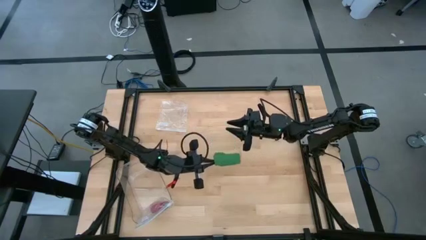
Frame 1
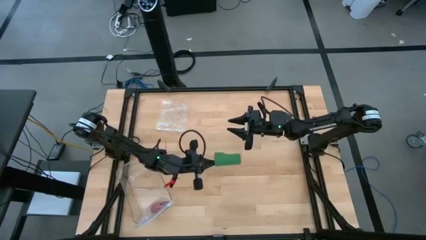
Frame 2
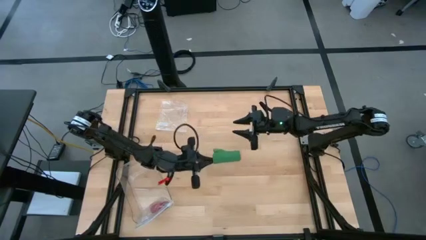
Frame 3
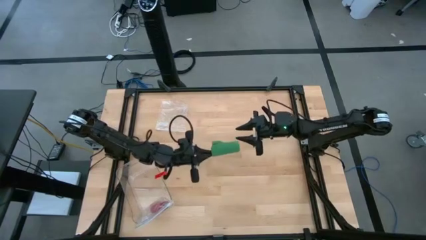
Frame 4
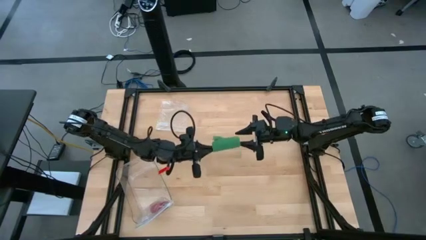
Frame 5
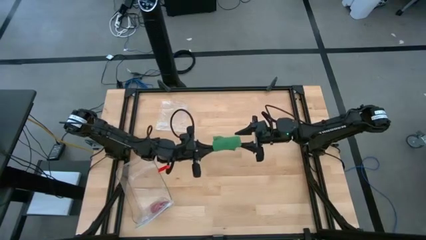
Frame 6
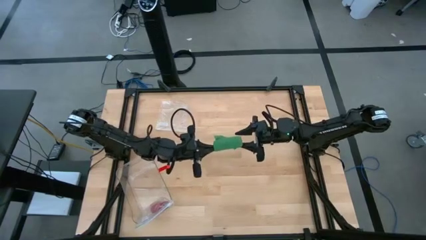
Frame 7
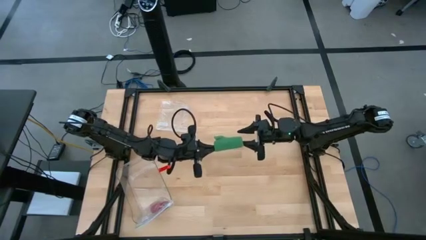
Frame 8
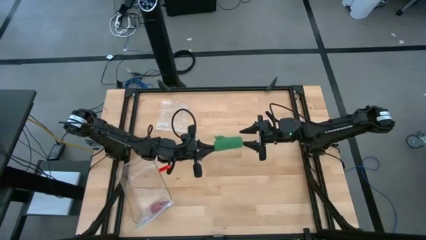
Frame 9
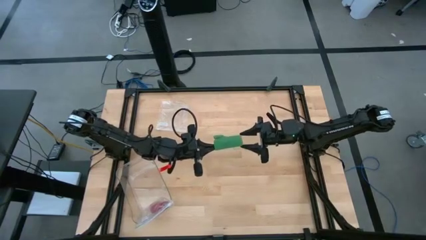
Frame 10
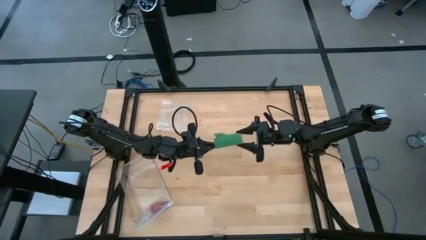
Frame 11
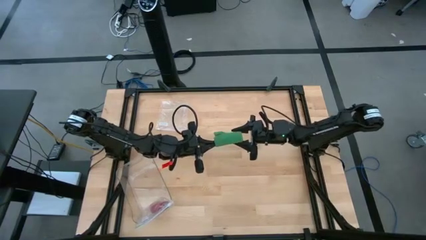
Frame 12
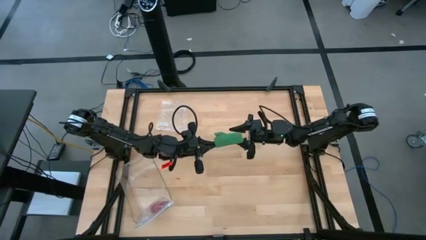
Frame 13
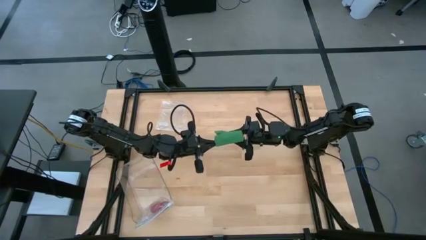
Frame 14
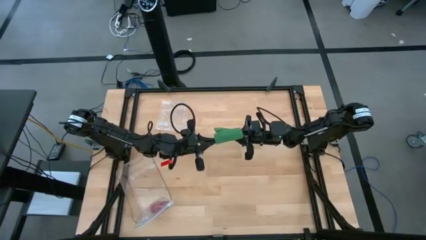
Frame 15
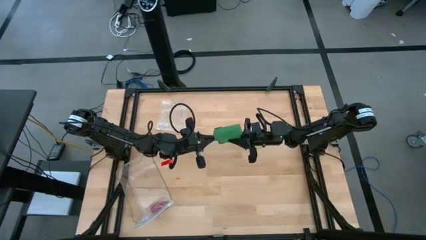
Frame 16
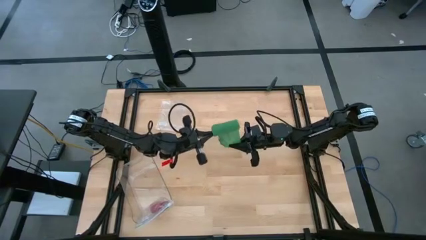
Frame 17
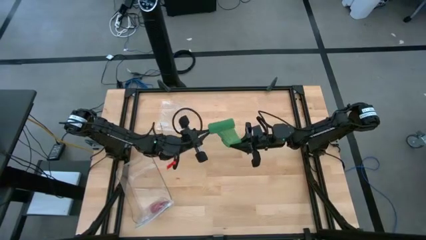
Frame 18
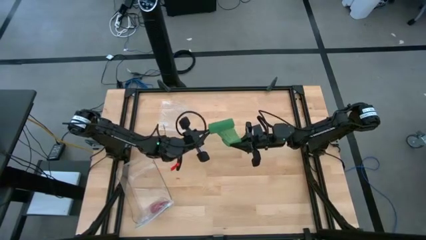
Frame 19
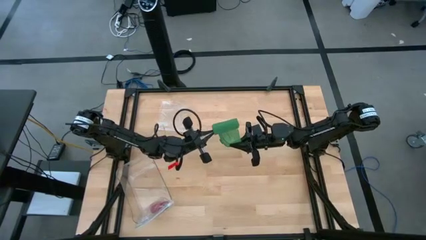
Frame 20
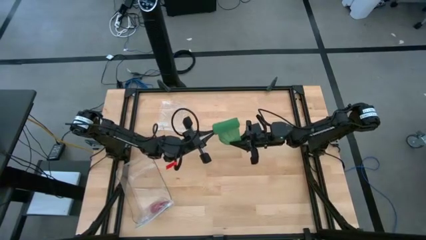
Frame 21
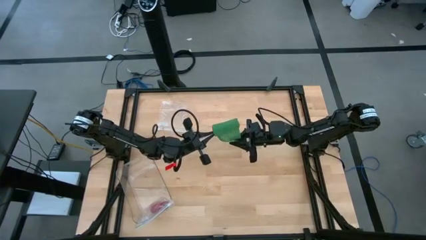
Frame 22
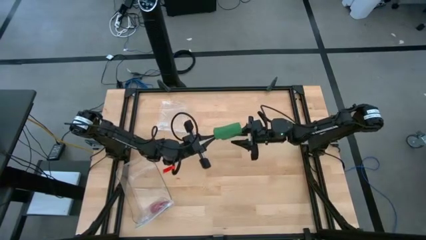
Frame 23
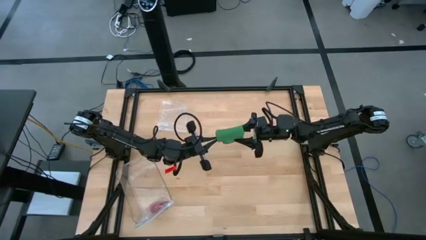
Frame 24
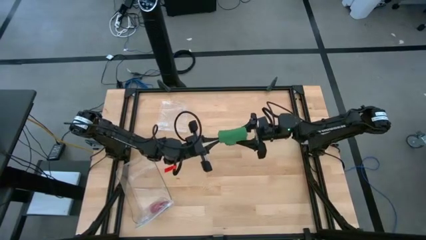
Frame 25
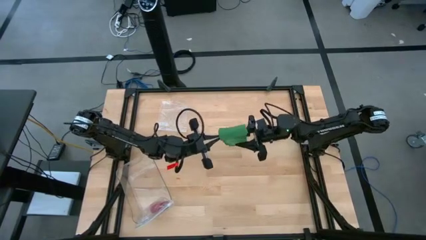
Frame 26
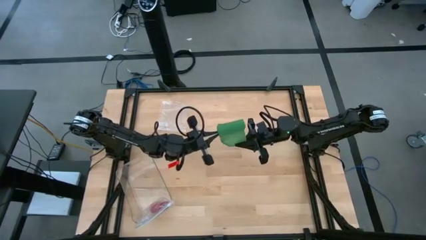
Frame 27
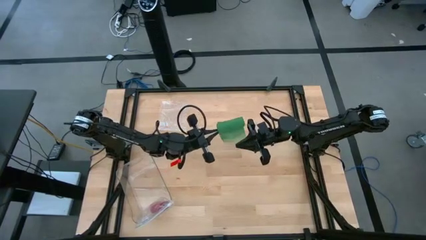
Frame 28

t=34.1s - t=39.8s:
Task: Roll bandage
Roll the green bandage

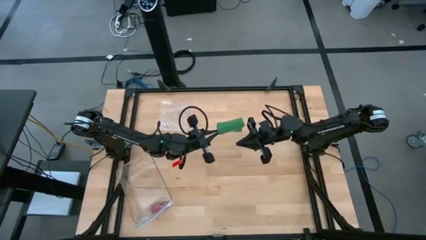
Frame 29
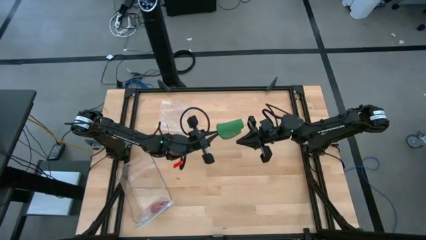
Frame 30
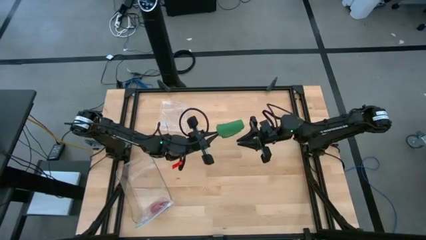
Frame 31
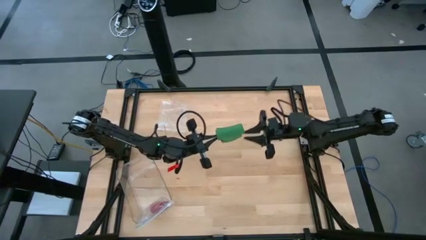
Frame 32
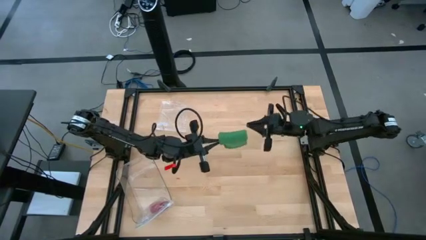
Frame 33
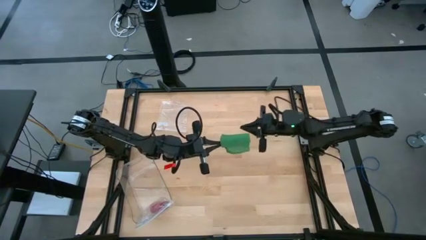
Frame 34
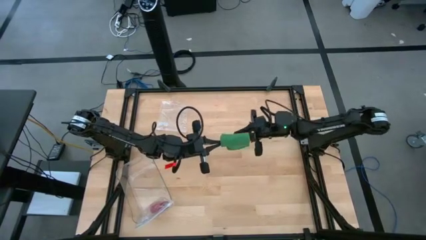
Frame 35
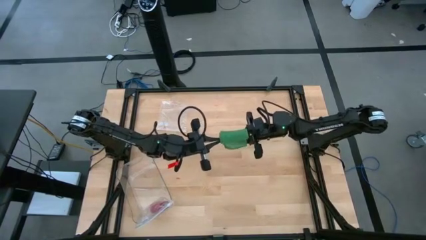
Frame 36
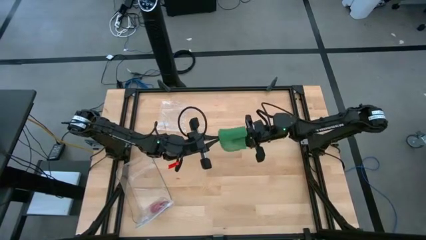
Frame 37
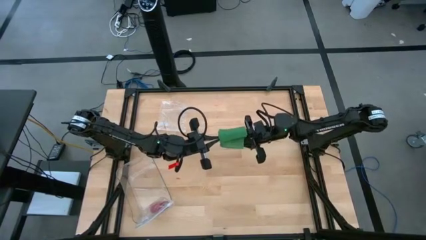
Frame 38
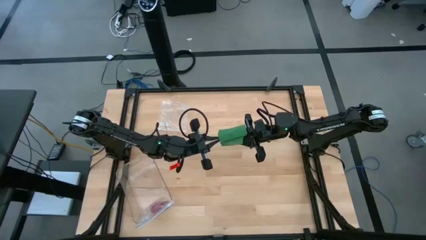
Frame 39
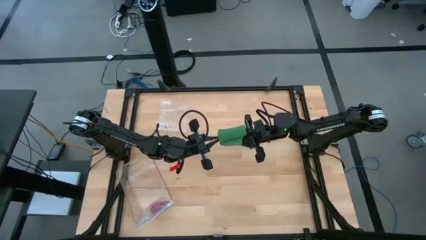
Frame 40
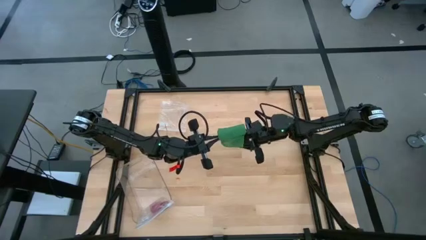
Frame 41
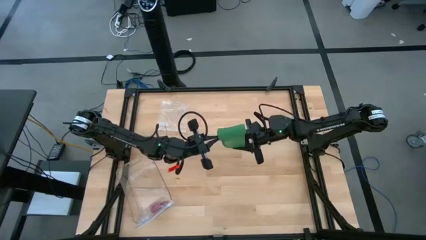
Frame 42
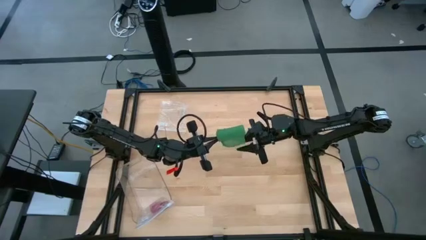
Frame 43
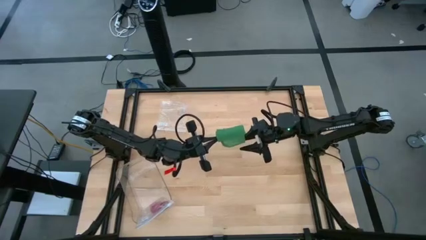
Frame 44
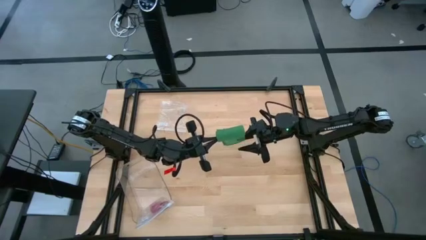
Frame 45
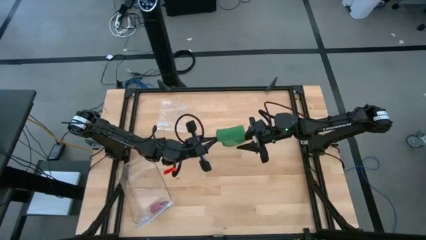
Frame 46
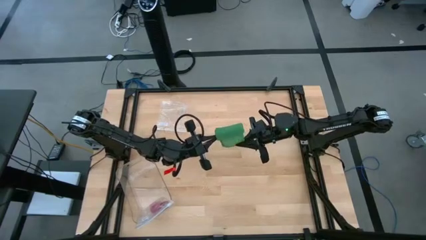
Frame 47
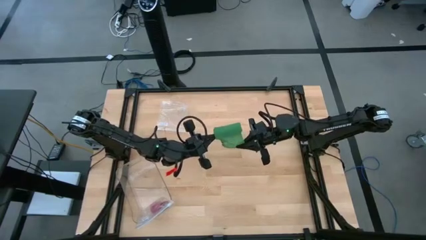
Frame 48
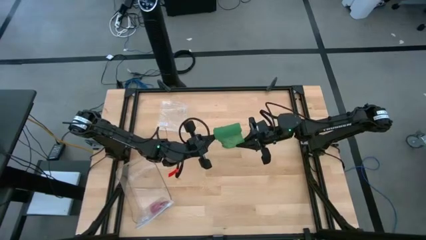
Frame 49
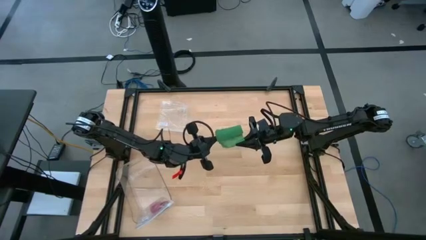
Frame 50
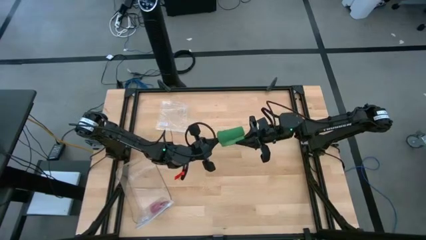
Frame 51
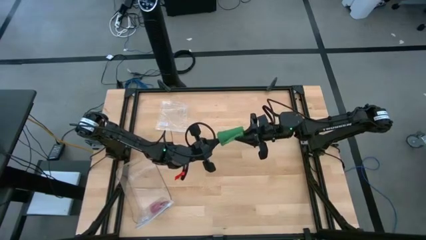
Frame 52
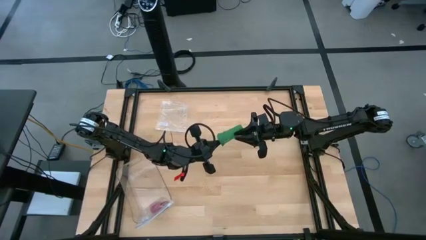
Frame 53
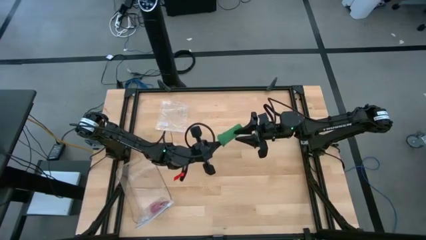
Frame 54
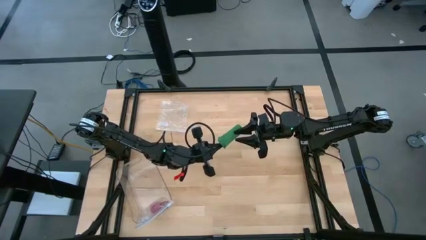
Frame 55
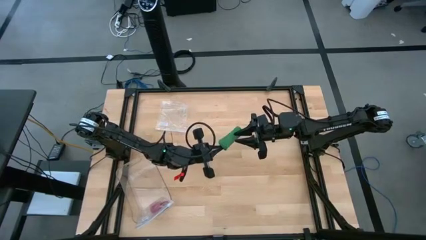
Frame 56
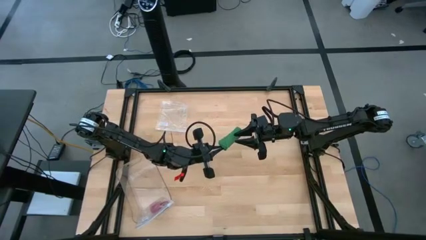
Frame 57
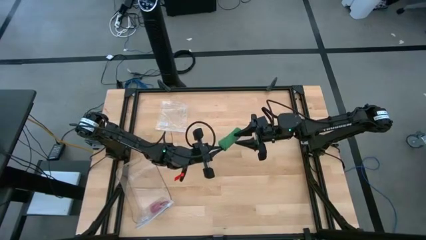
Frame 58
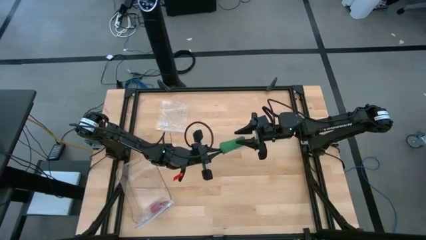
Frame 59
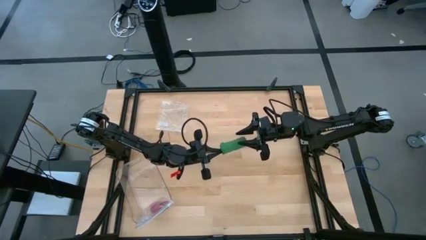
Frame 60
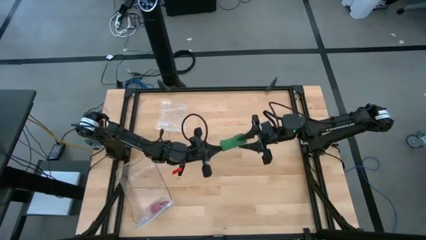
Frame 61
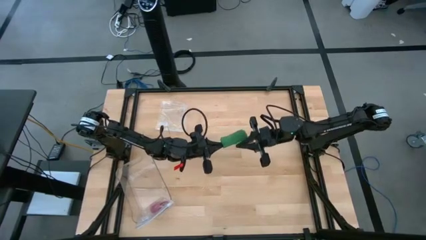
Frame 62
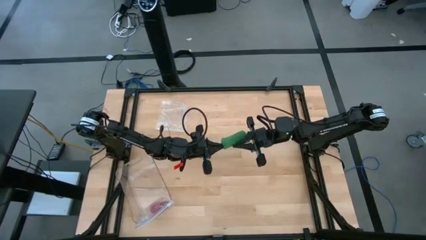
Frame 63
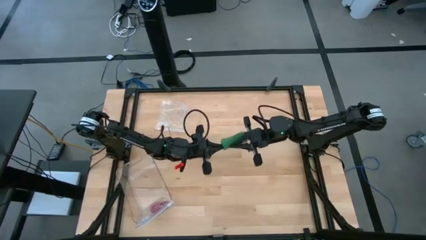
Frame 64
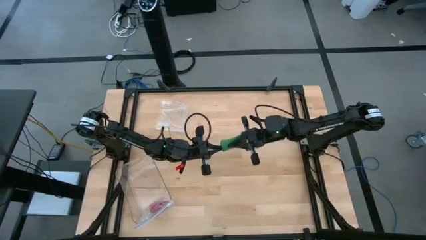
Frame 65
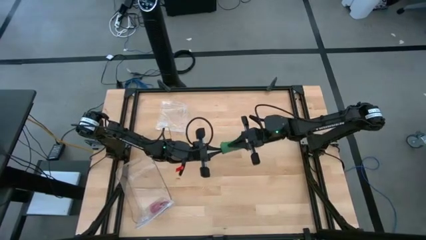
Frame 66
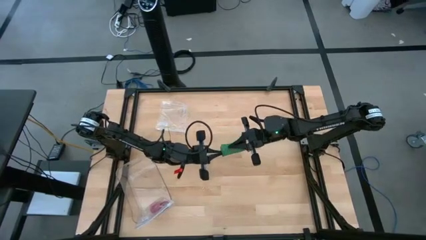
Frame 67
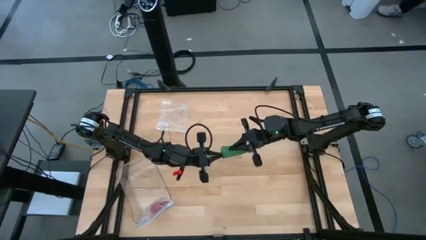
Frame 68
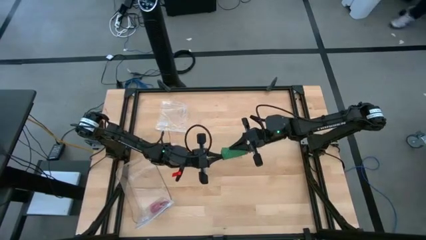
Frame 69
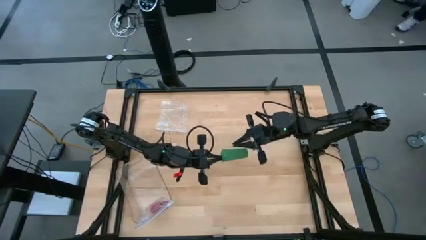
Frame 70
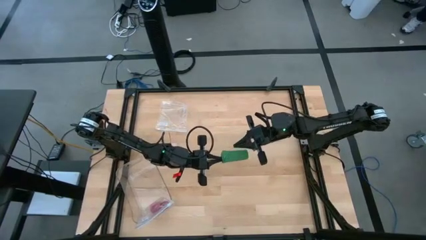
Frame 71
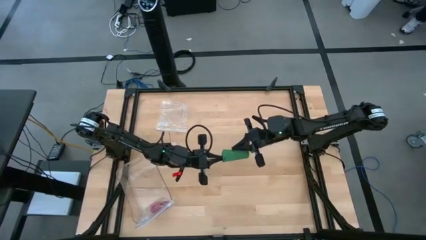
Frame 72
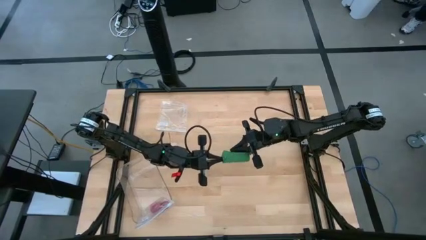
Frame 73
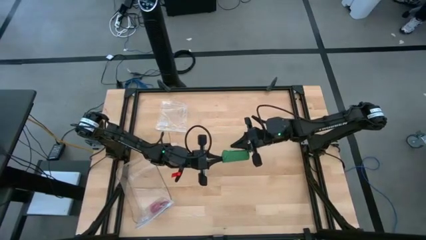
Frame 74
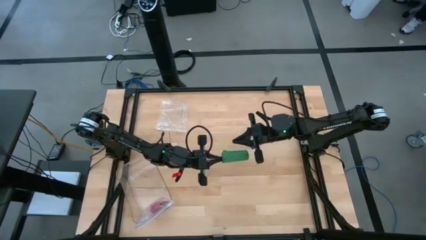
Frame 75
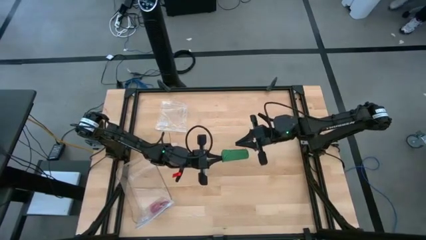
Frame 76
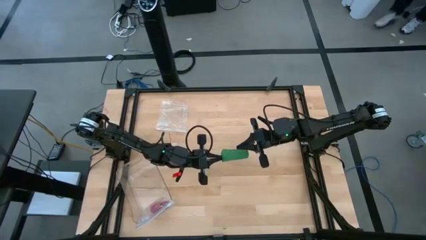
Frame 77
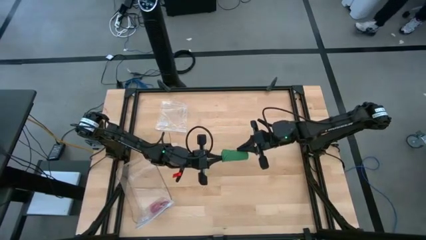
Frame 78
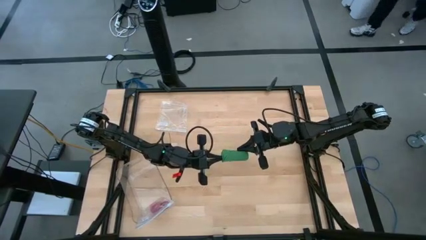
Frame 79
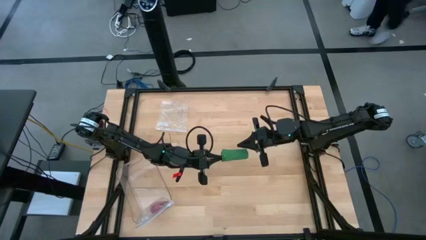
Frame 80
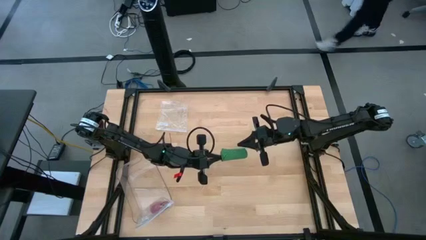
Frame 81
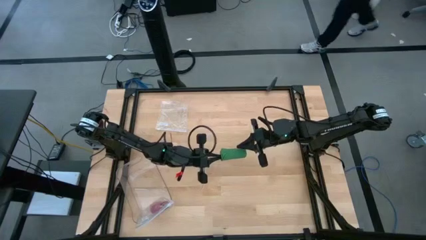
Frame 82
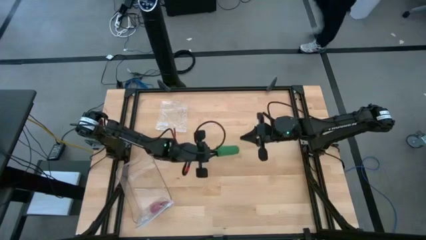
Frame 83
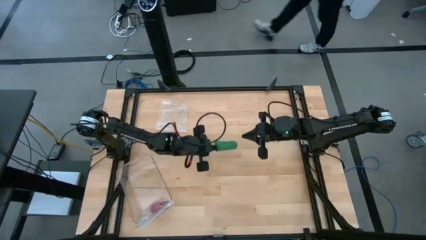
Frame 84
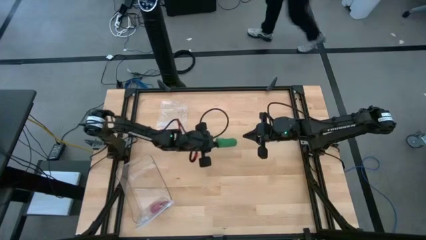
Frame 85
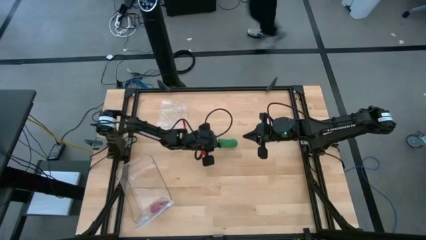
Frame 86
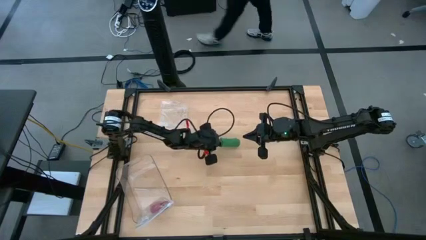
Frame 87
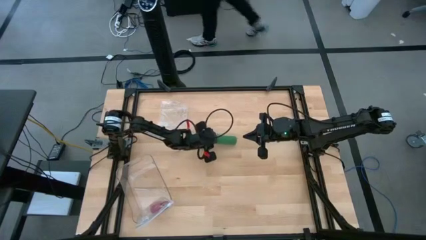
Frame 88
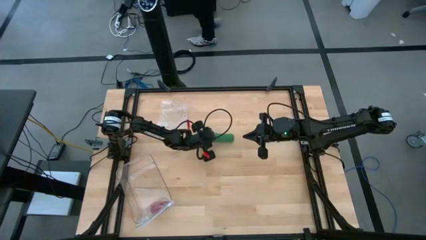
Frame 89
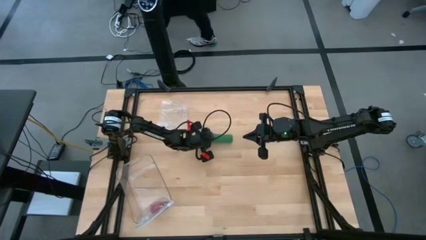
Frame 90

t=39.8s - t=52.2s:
Roll the green bandage
